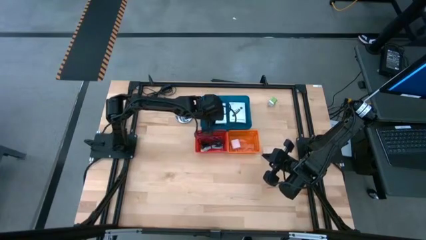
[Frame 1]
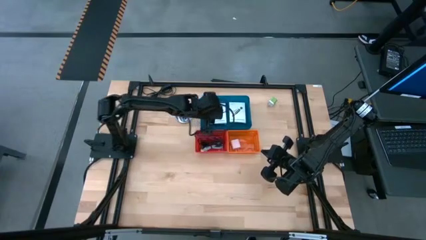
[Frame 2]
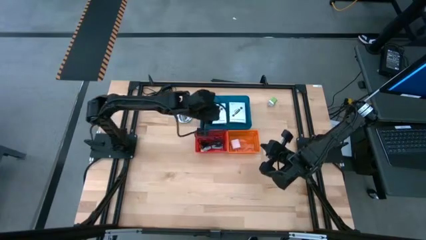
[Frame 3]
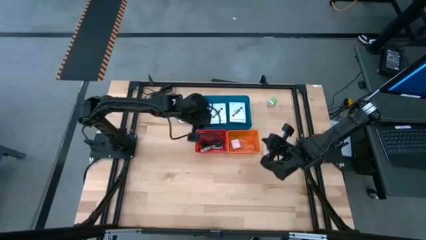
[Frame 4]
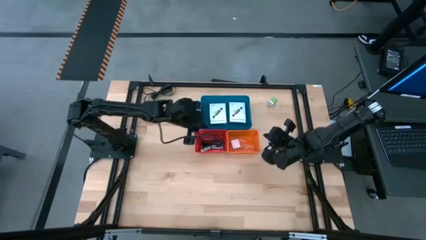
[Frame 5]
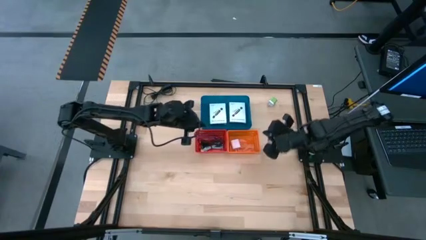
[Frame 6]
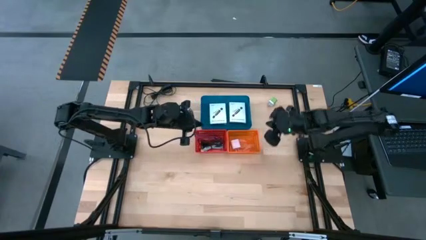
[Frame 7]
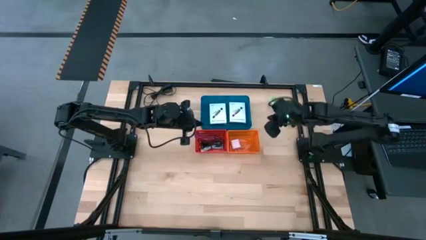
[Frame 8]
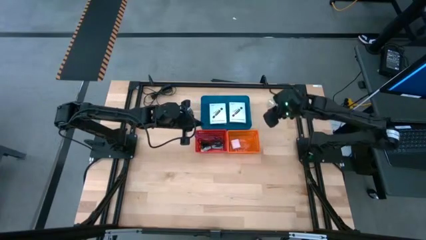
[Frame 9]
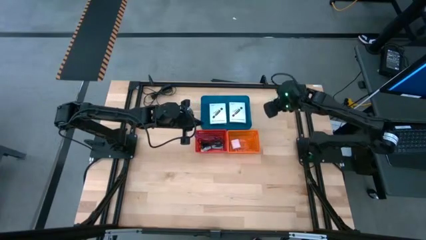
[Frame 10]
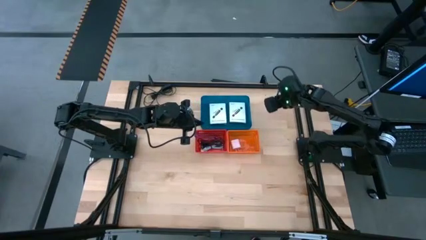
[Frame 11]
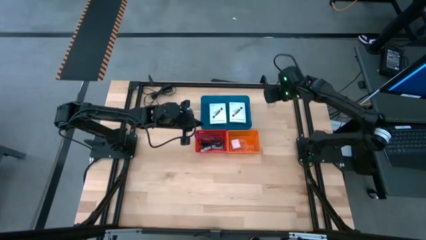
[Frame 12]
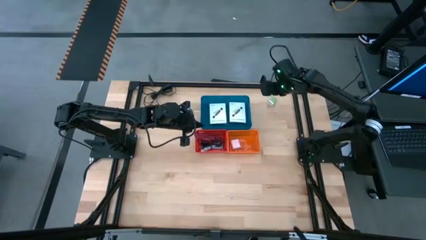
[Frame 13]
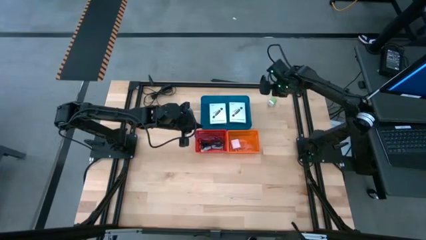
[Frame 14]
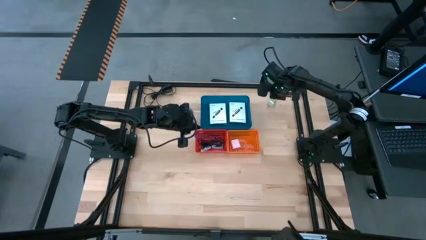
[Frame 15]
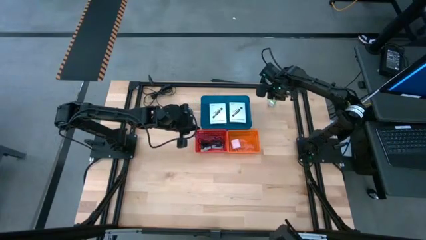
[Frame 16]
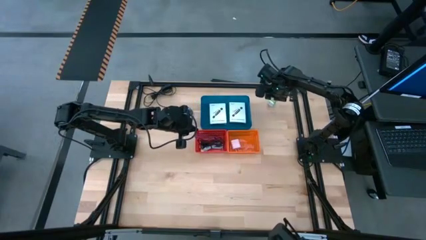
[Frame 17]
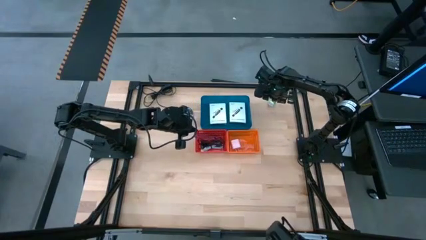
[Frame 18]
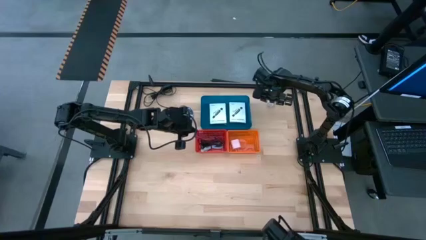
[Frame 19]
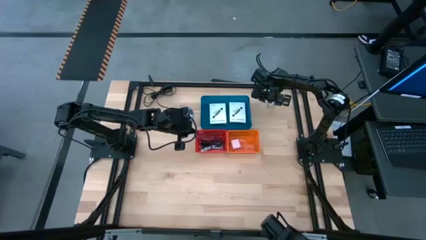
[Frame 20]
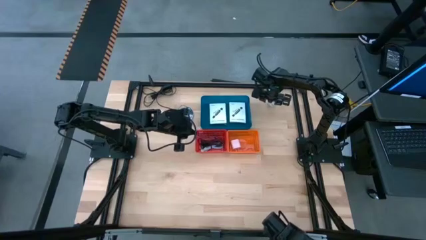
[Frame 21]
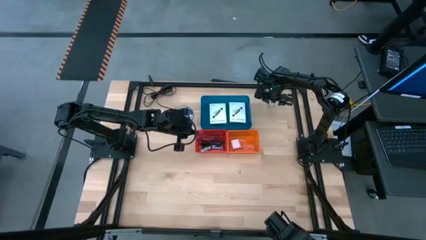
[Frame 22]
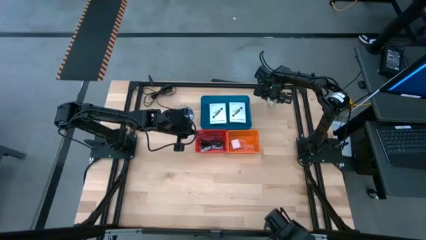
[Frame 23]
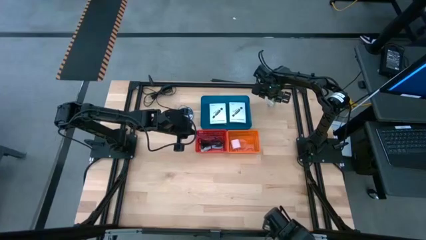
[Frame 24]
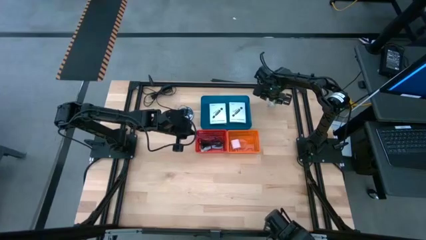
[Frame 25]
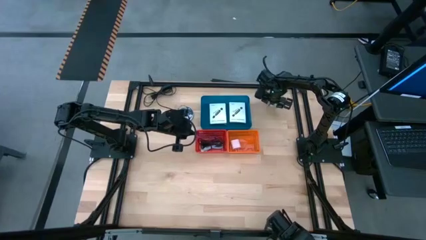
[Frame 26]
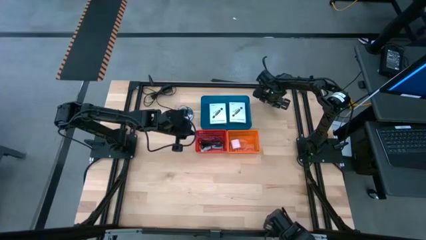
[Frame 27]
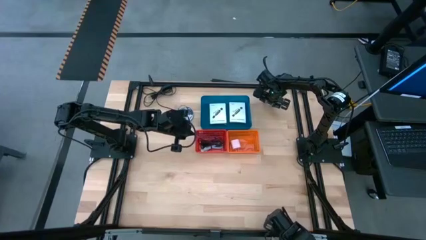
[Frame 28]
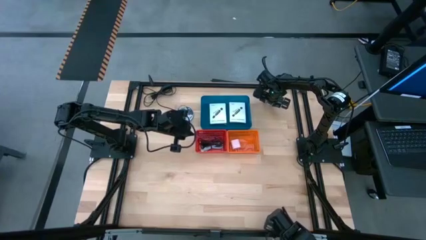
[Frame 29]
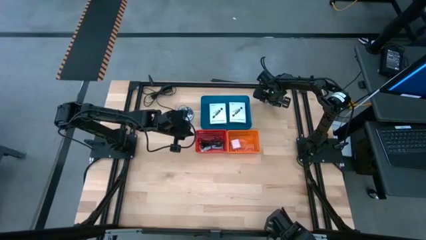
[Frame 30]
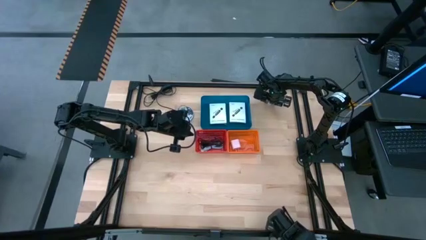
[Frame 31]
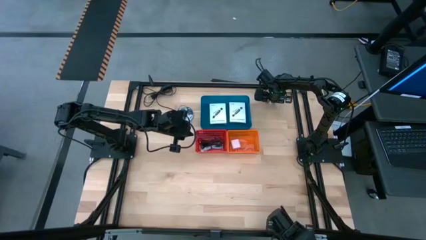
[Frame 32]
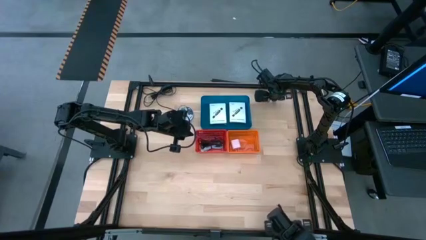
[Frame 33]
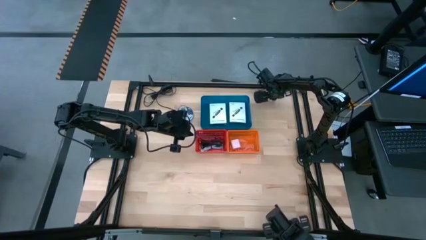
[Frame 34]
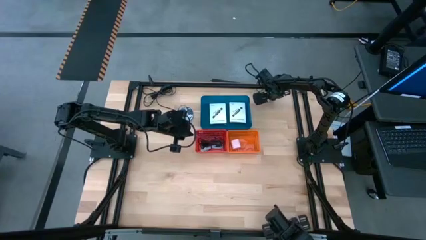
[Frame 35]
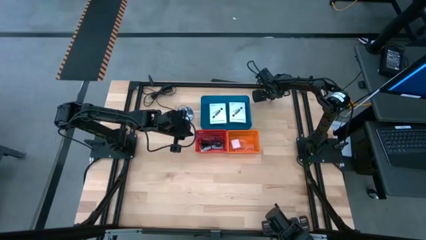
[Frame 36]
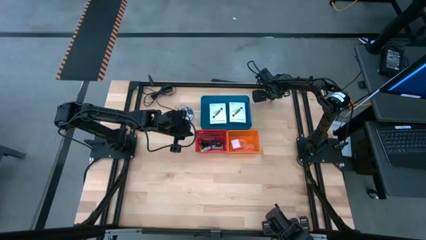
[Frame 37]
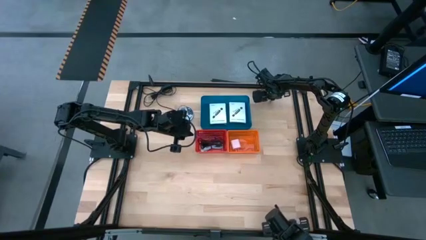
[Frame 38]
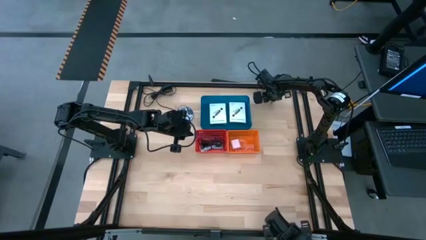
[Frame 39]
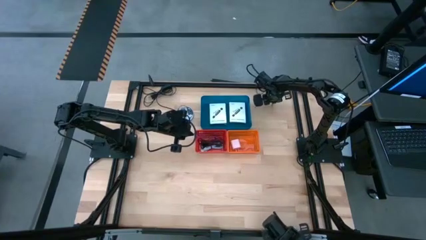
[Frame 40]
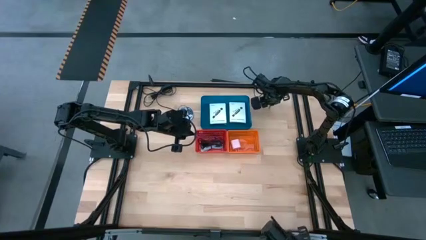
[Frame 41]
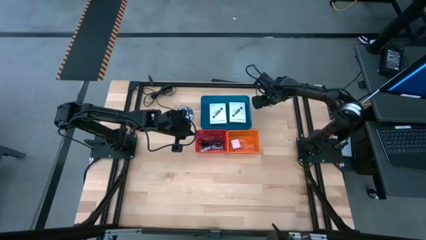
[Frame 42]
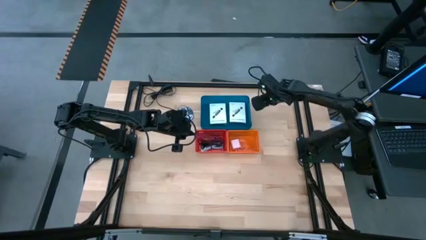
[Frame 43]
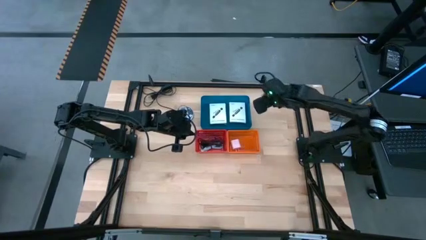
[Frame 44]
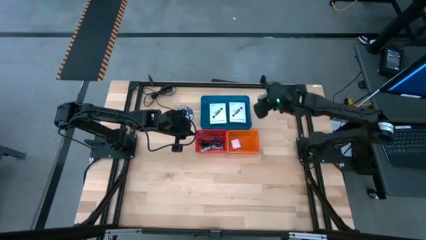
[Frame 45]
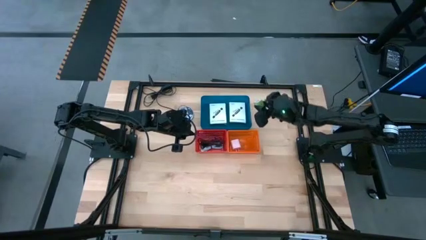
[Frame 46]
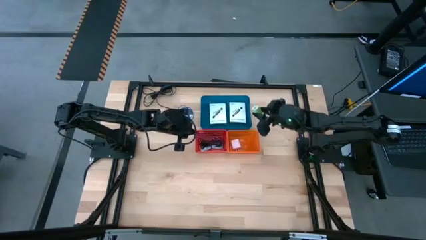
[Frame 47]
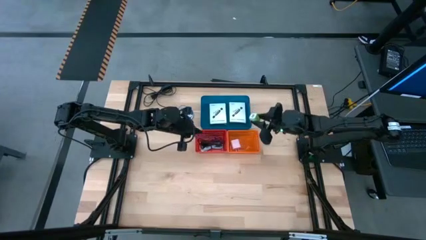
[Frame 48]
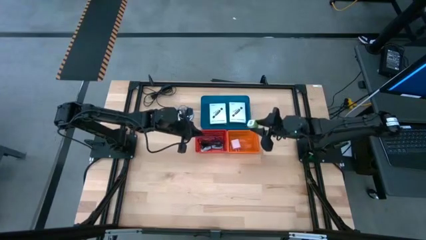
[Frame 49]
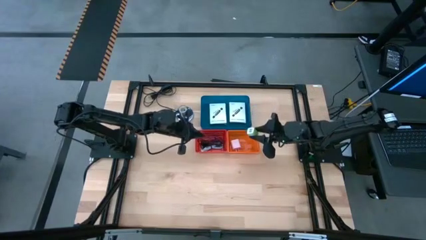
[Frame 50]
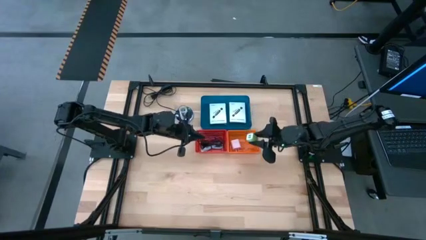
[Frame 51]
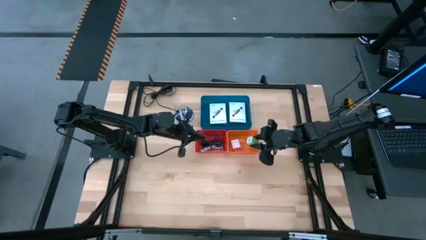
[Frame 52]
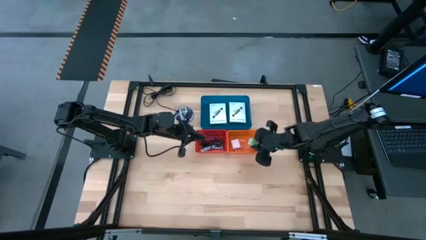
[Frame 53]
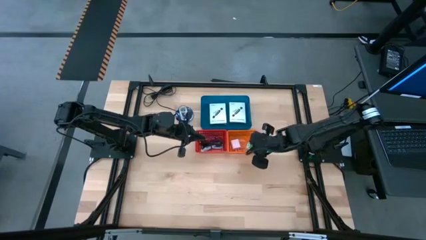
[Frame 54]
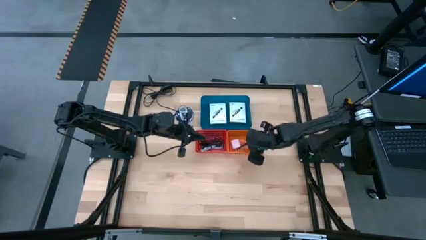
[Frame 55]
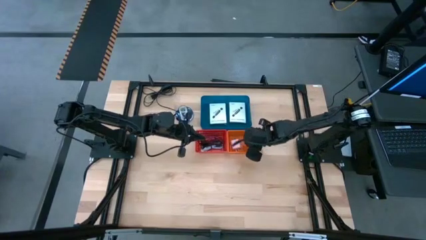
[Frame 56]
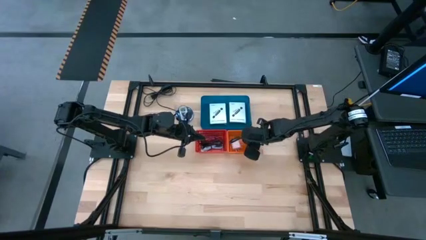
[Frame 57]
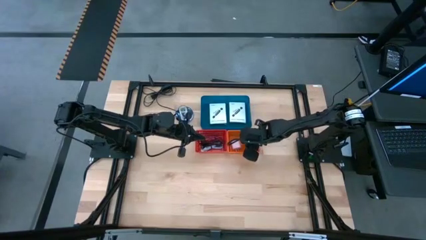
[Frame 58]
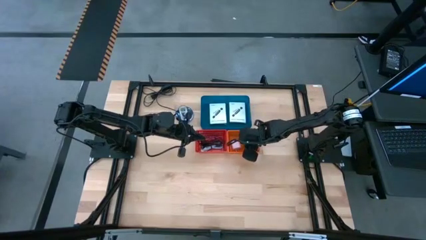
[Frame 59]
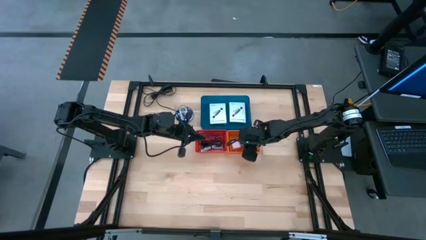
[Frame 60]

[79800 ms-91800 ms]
Task: Pick and place items into bin
Put the green charger adapter into the orange bin

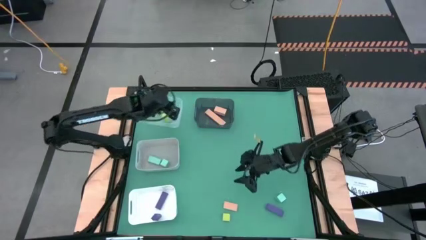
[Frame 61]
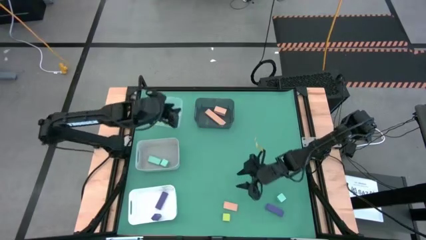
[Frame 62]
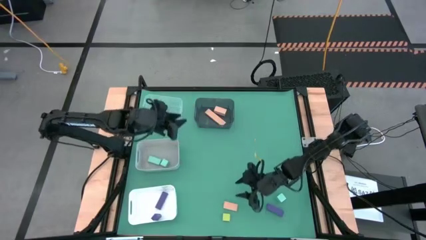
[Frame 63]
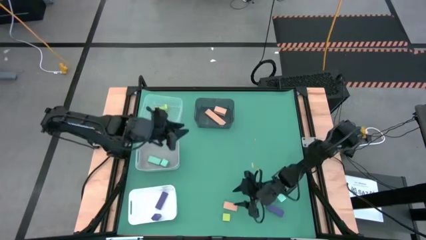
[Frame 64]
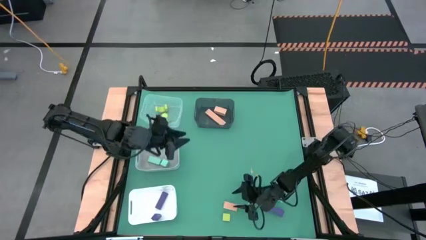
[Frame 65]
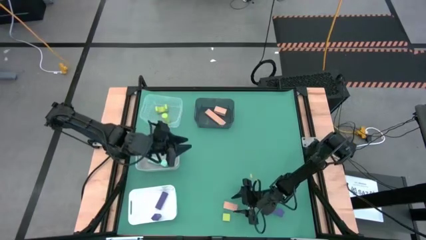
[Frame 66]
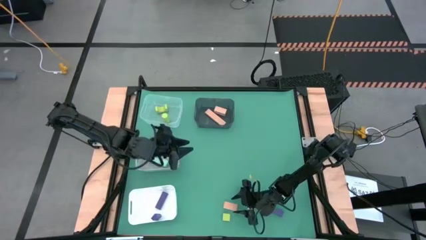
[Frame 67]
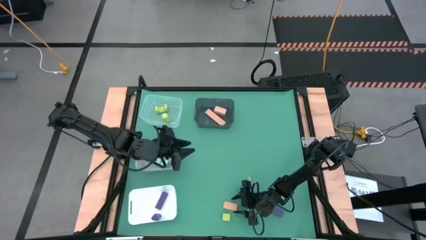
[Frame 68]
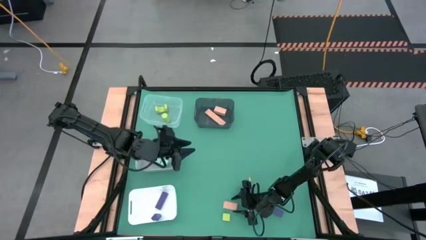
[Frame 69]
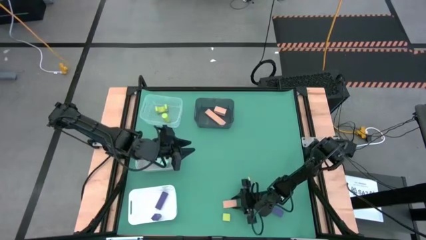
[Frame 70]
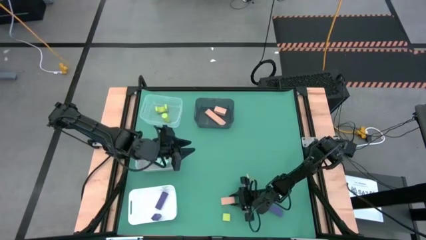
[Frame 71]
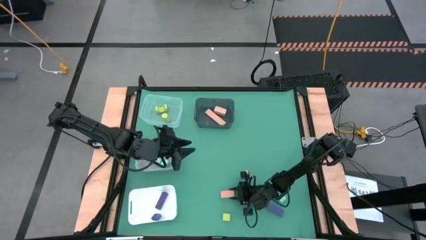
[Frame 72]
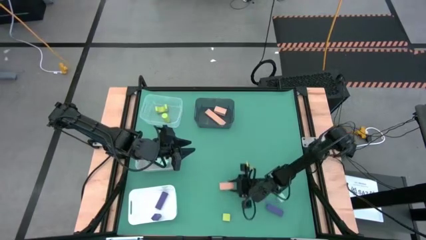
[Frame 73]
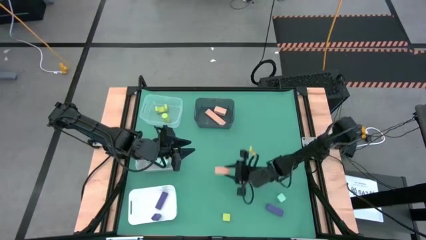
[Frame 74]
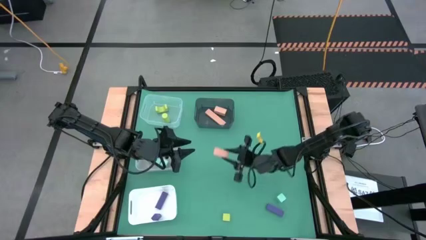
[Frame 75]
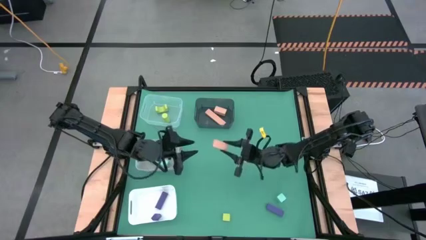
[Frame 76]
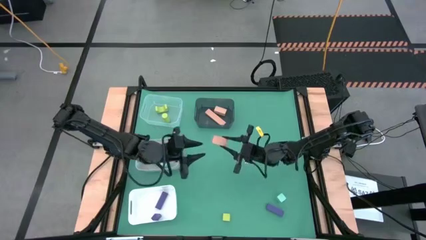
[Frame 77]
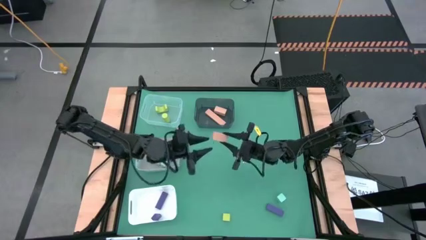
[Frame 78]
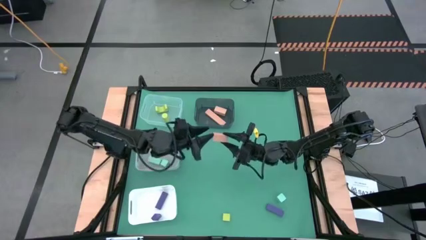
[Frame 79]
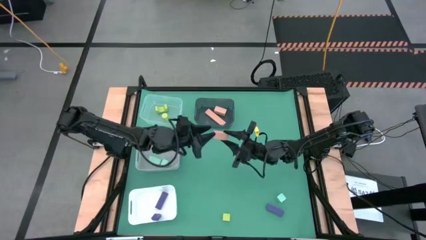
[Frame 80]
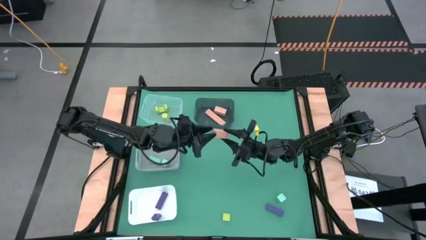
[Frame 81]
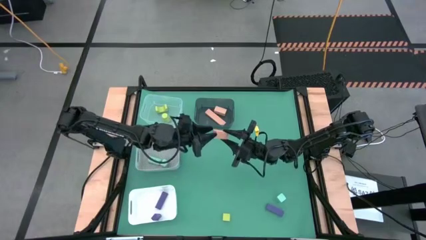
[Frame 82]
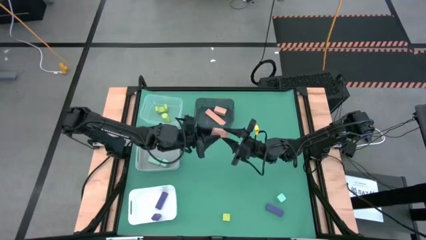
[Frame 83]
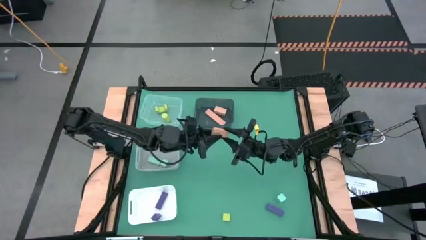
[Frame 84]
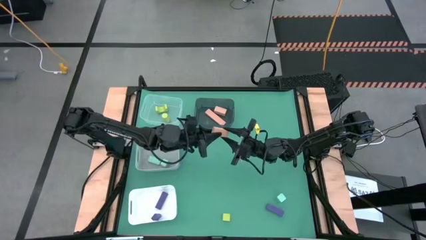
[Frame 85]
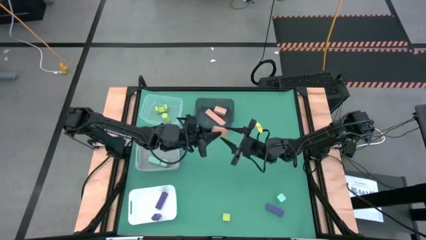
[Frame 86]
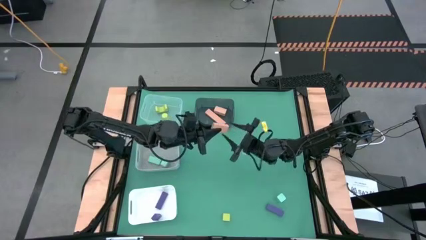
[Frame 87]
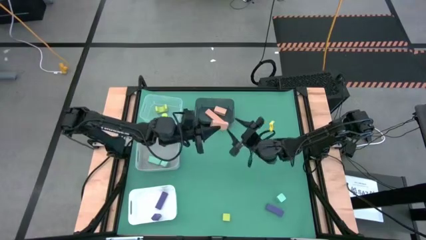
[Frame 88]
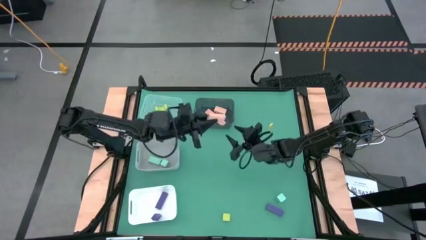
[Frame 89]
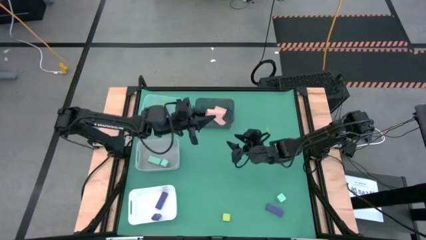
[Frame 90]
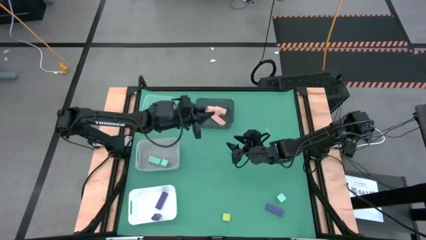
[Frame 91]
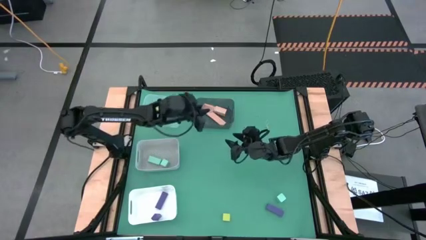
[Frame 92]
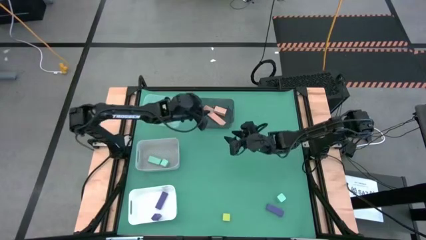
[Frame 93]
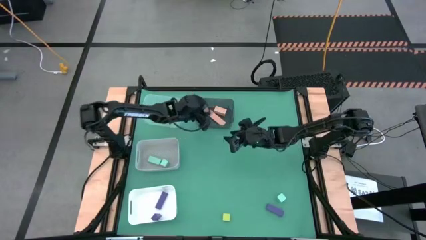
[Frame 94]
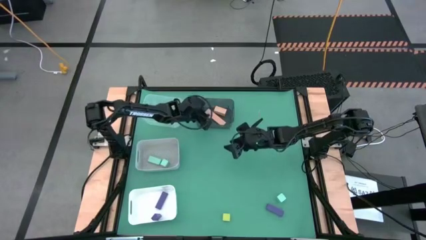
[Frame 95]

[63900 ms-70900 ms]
Task: Sort & place blocks by color
Put the brown block into the black bin
